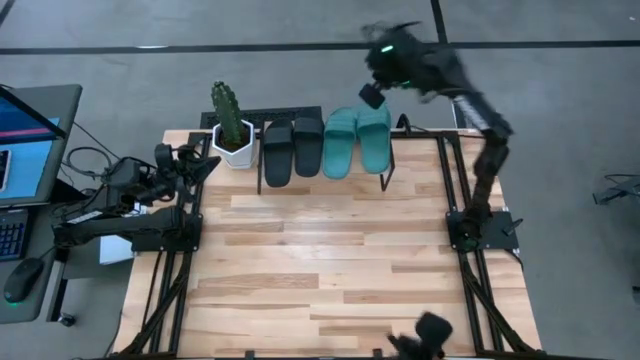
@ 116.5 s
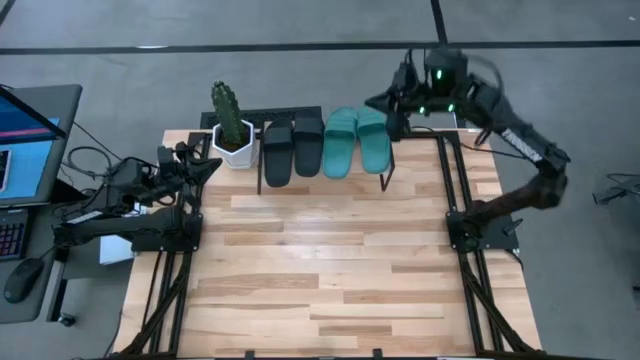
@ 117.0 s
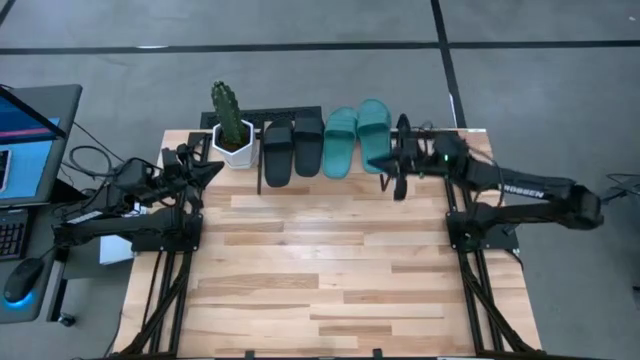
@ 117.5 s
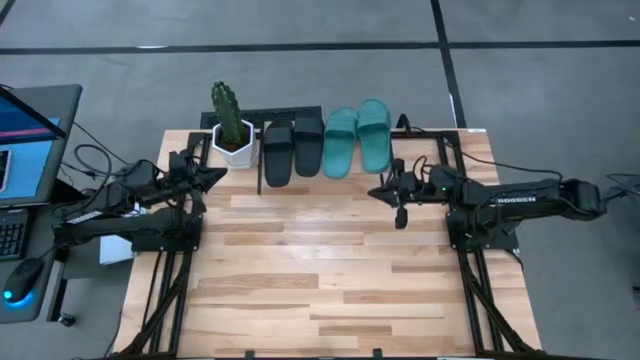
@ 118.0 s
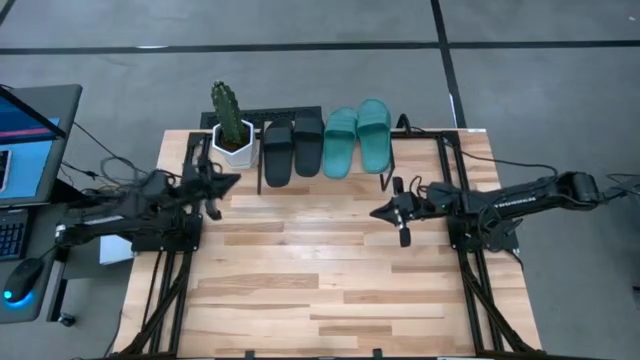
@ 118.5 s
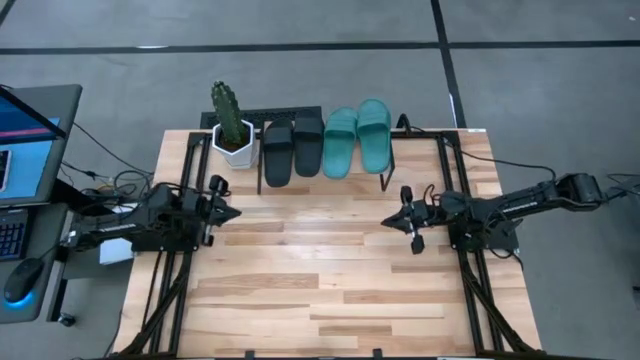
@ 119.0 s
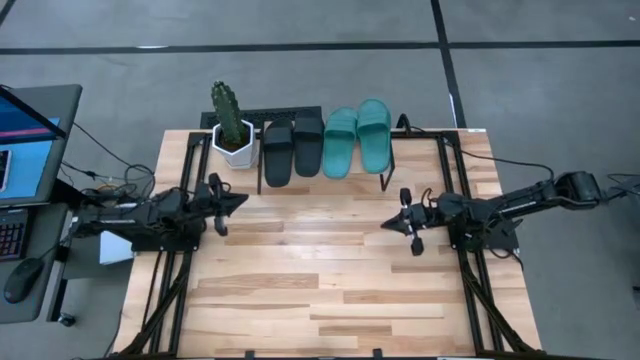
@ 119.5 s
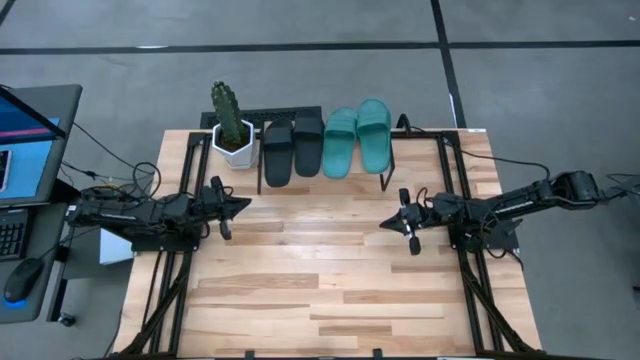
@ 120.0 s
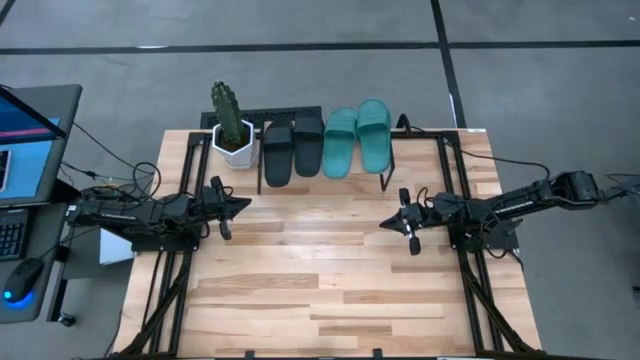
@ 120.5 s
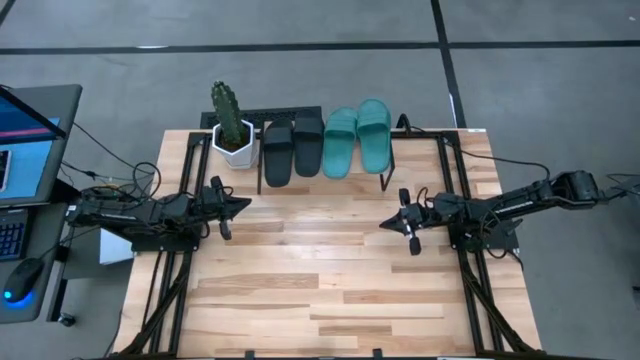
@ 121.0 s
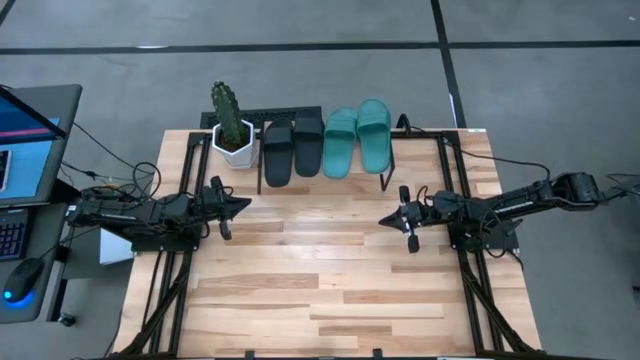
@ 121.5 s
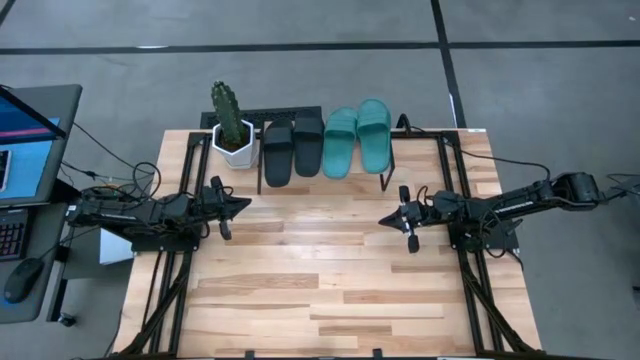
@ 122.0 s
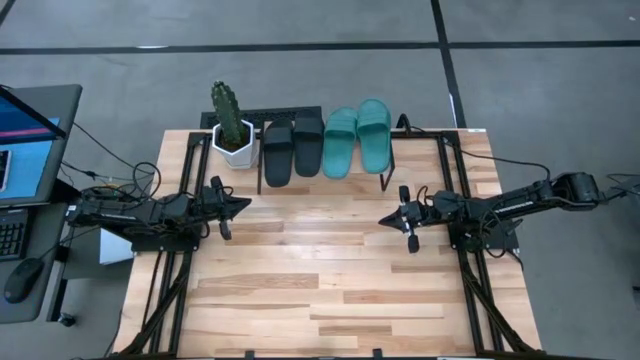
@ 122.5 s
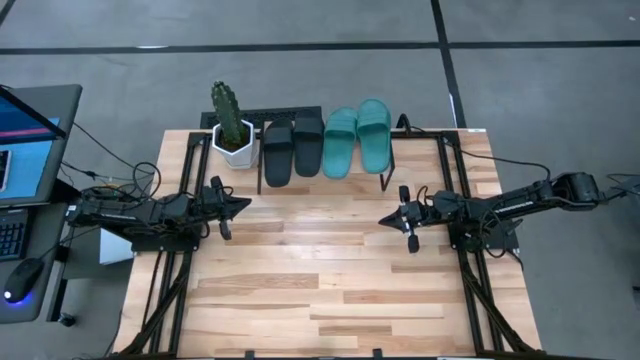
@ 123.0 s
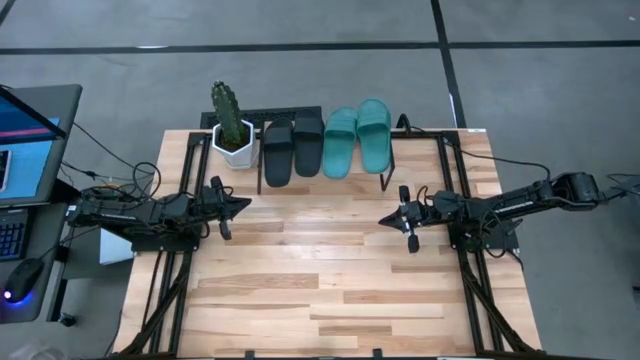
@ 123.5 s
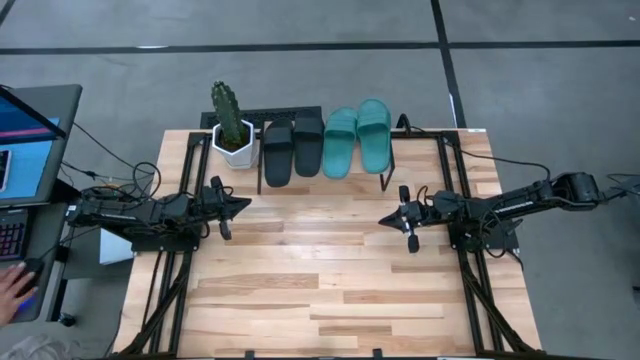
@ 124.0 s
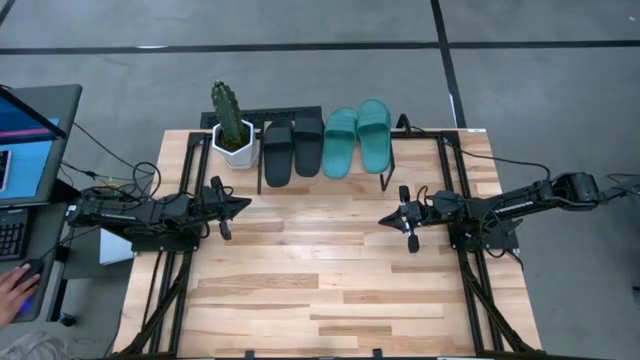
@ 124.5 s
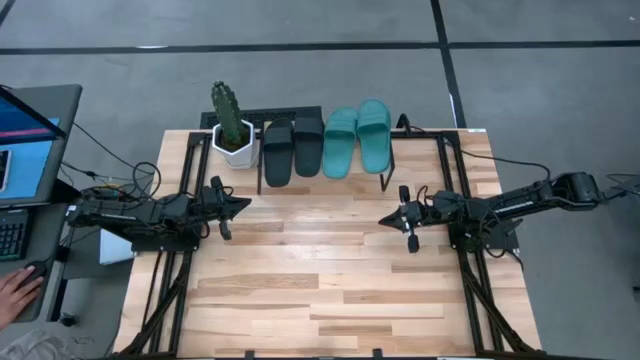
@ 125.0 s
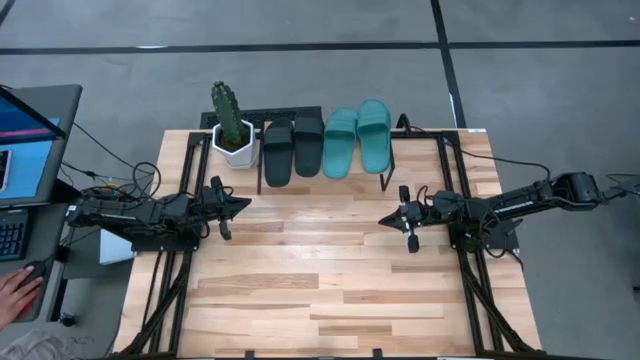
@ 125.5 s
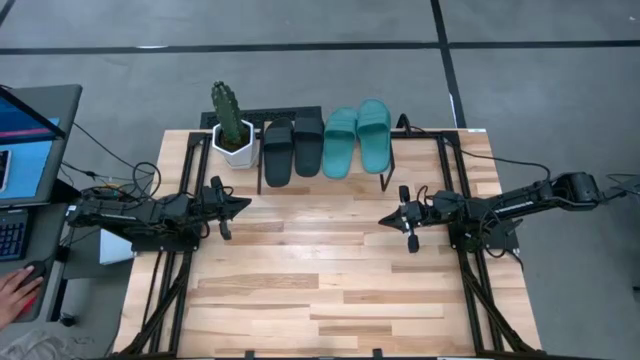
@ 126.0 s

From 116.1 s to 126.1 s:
Task: Pick and place slides into the shelf
Return to Home Position

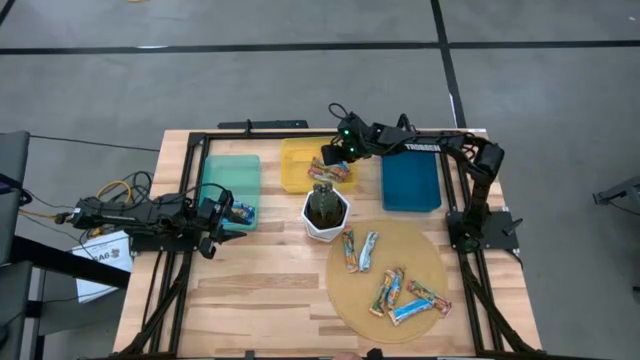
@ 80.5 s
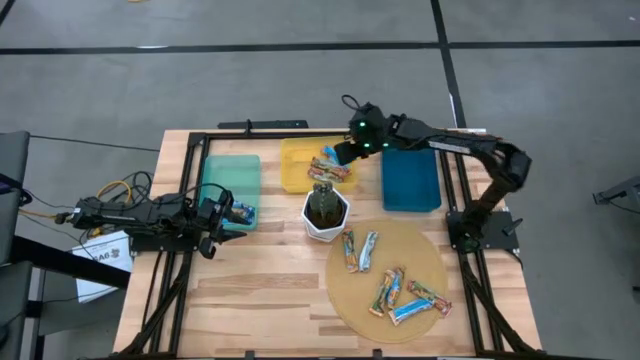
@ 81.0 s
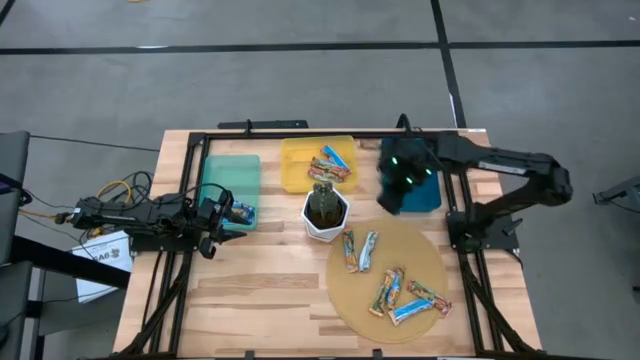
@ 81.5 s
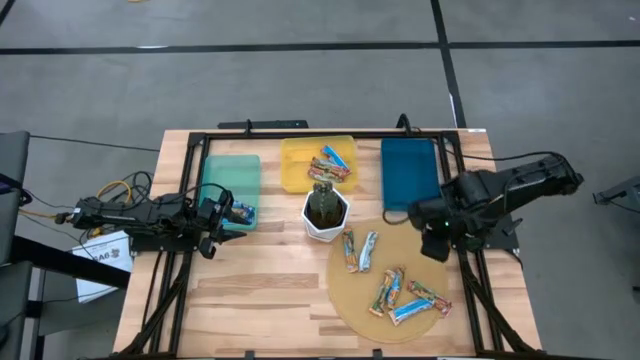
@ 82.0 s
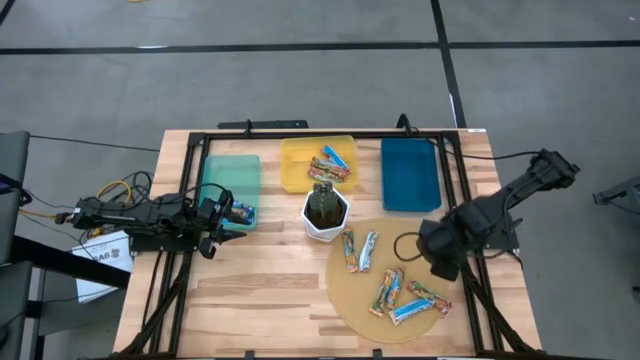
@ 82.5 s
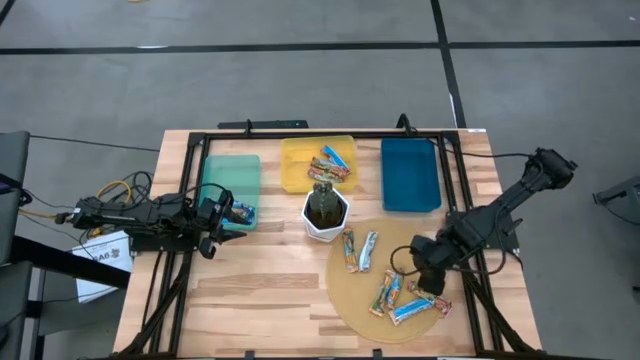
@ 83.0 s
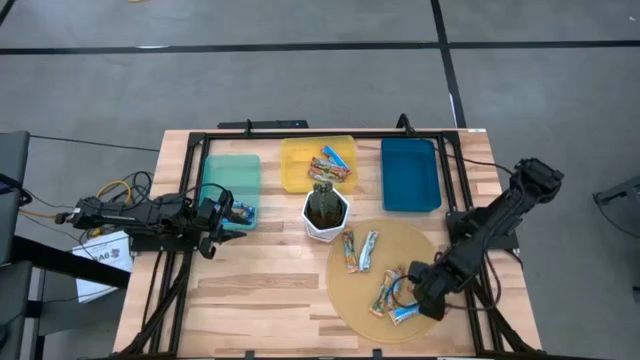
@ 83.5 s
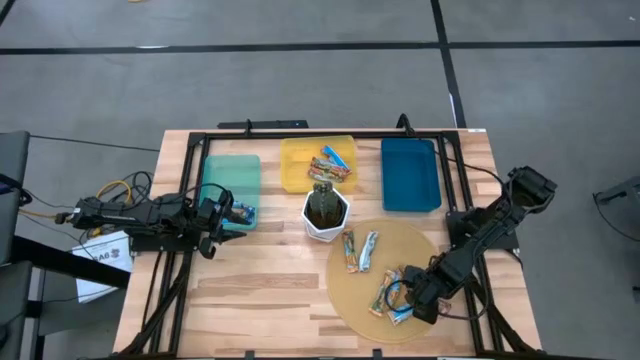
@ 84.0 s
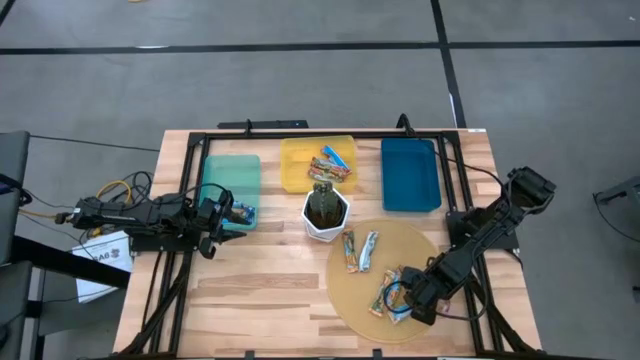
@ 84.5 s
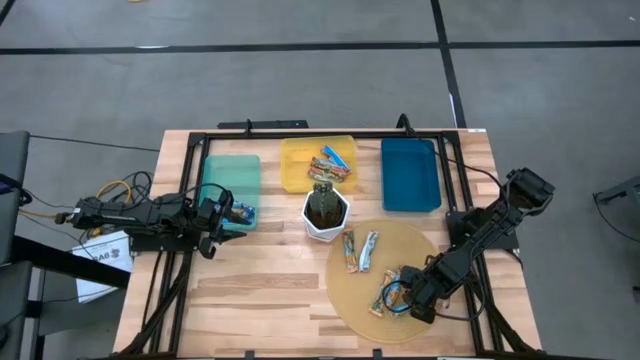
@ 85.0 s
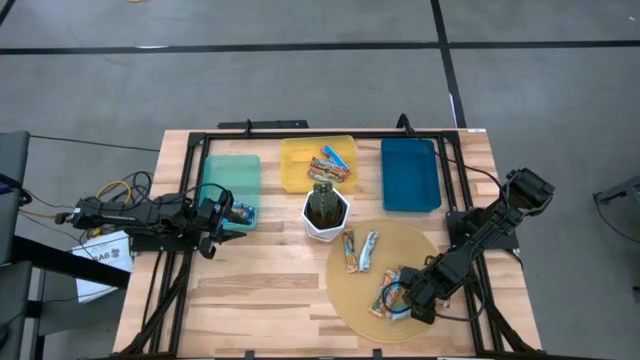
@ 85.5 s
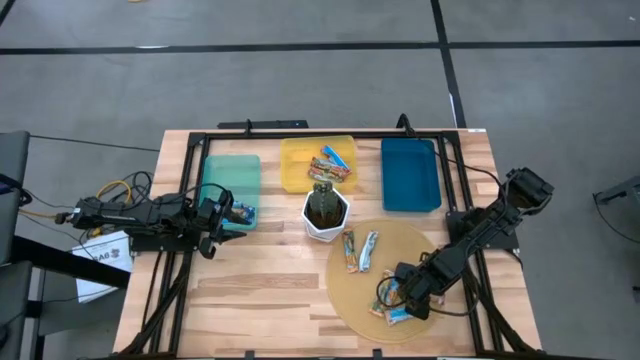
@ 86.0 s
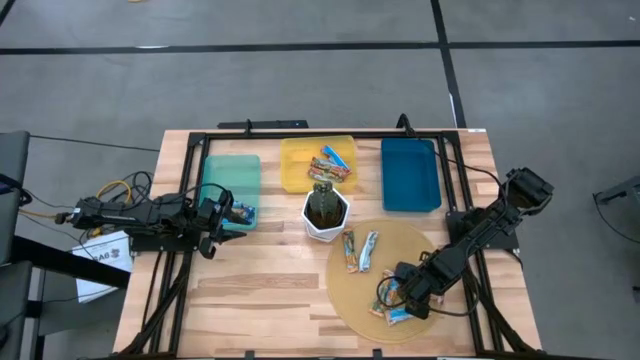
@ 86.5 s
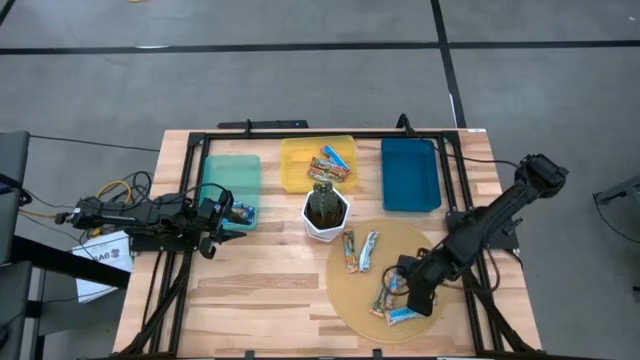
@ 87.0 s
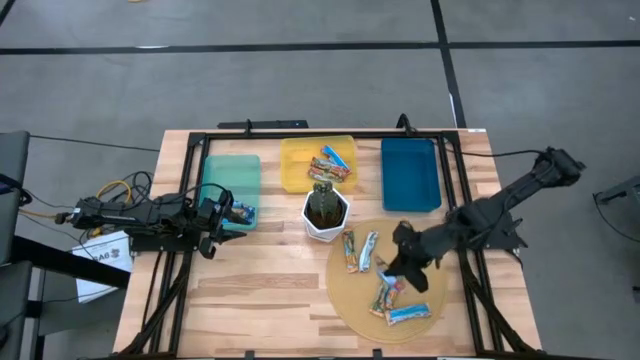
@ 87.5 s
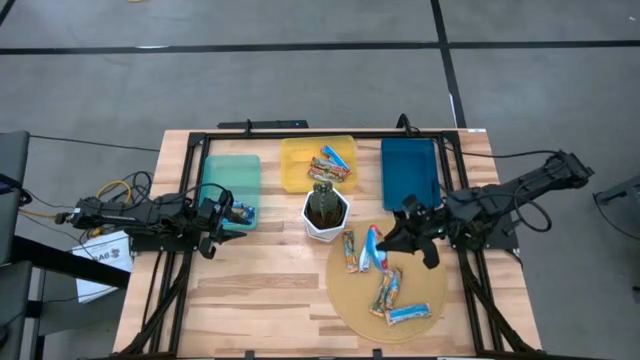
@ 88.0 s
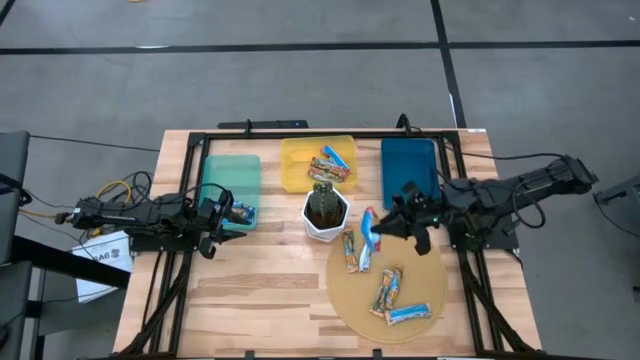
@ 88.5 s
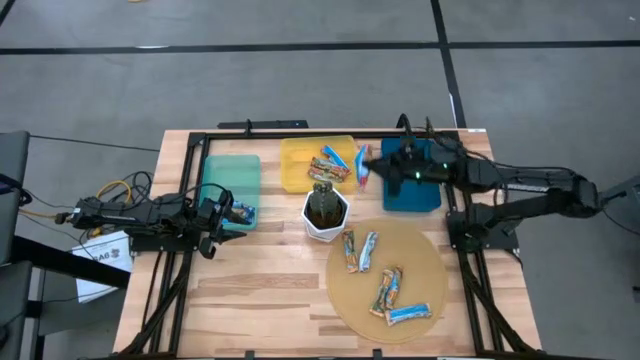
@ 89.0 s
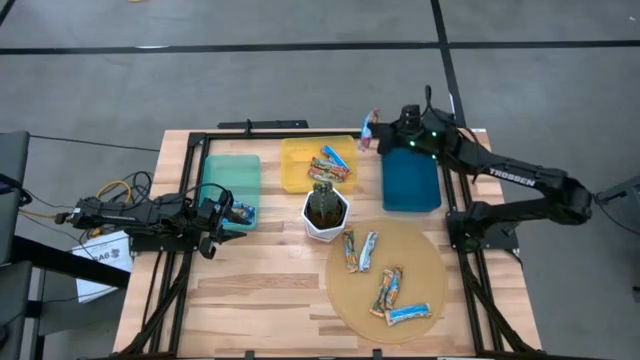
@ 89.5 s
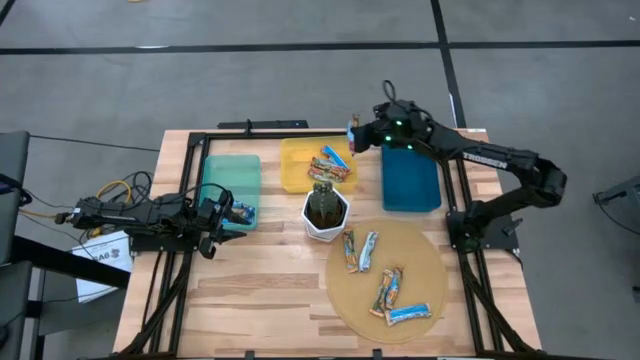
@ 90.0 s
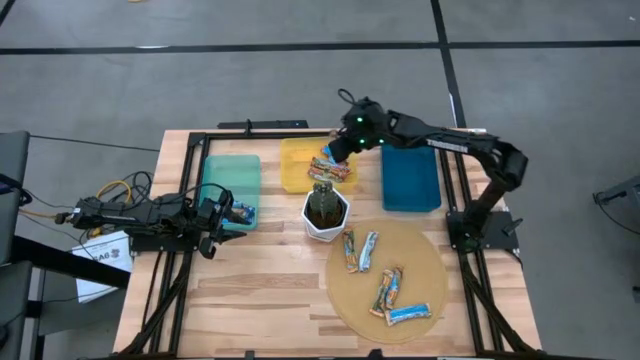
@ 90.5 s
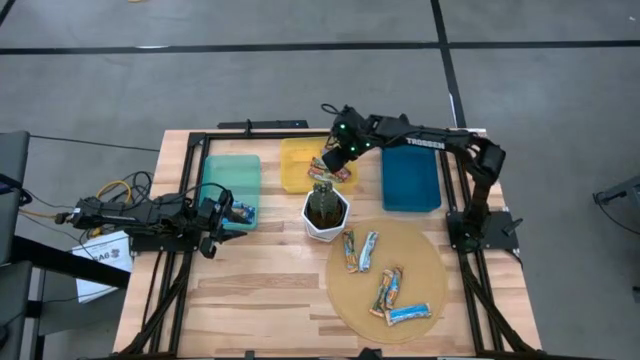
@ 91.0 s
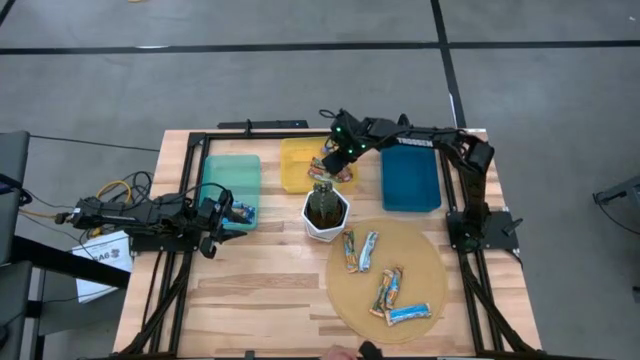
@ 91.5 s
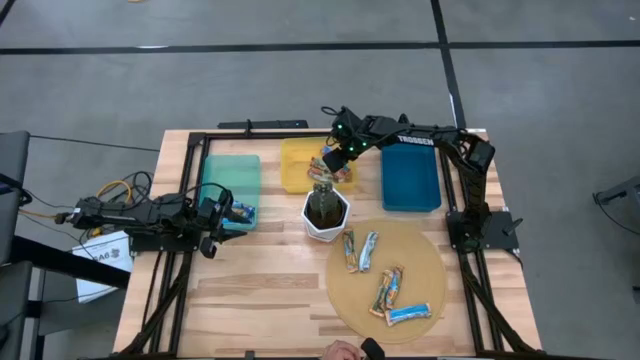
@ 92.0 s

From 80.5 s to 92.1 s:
Task: Pick and place Granola Bars by type
Put the red granola bar into the yellow bin
